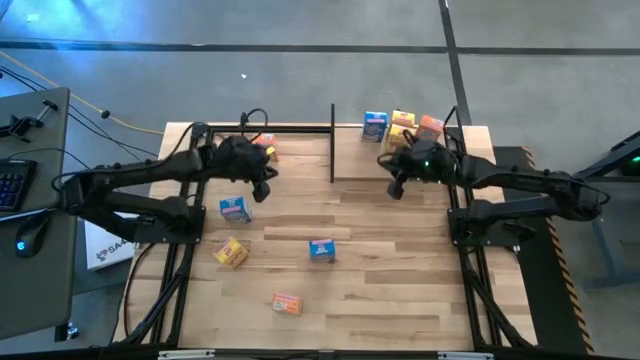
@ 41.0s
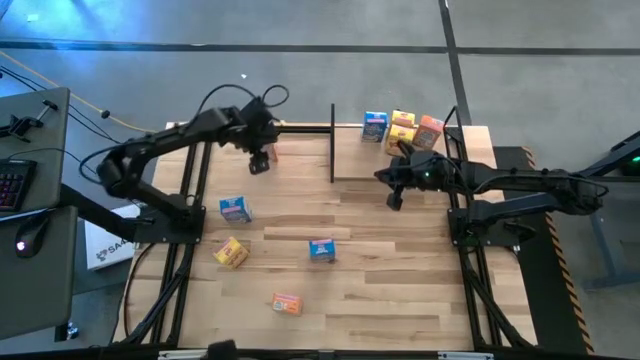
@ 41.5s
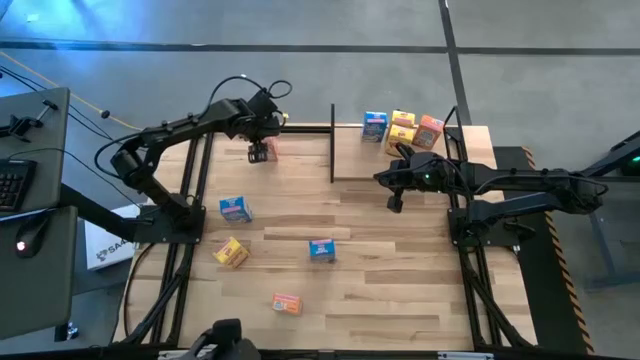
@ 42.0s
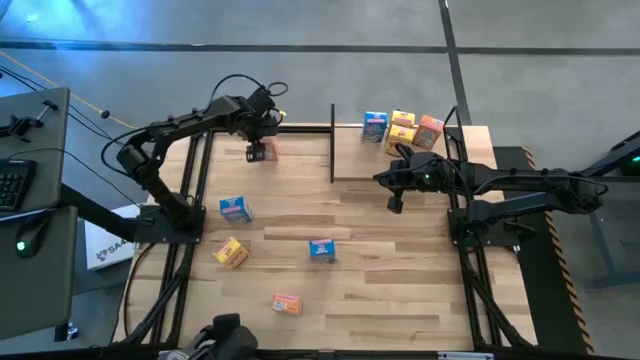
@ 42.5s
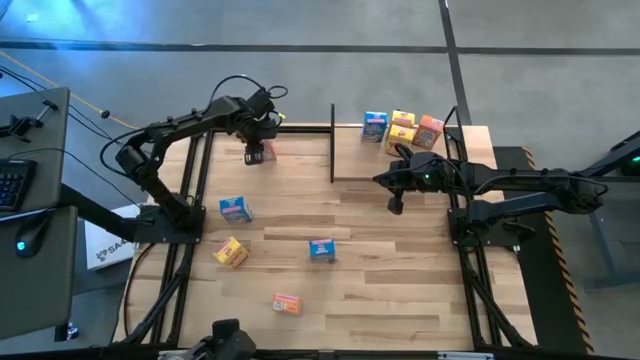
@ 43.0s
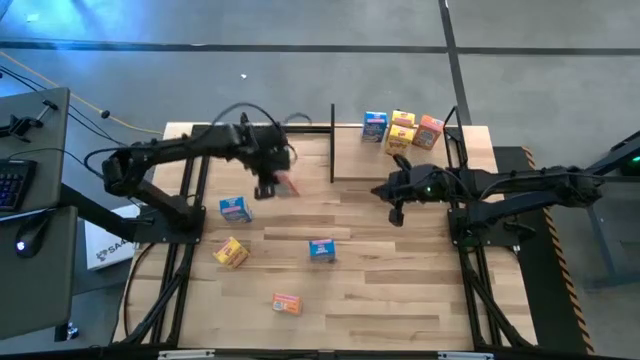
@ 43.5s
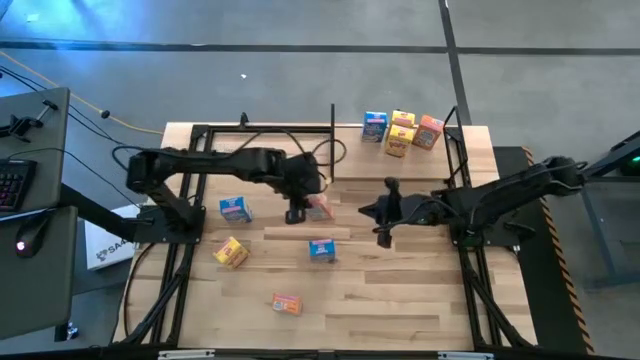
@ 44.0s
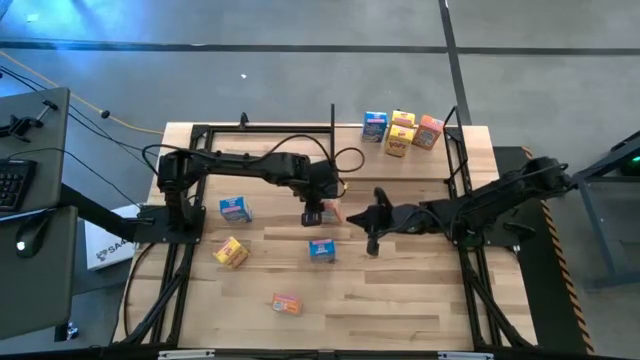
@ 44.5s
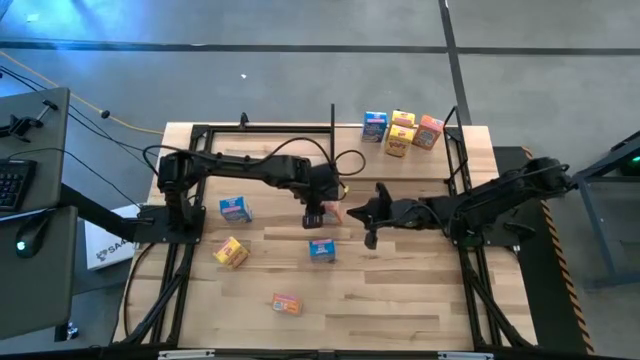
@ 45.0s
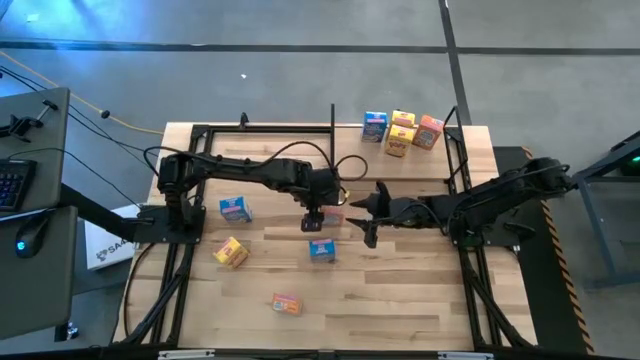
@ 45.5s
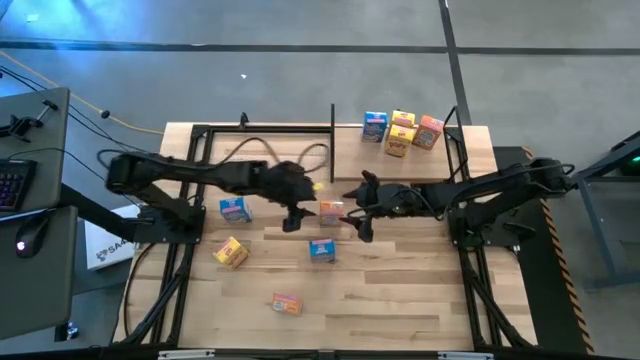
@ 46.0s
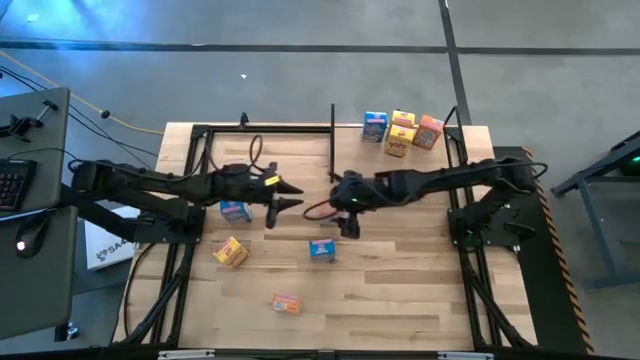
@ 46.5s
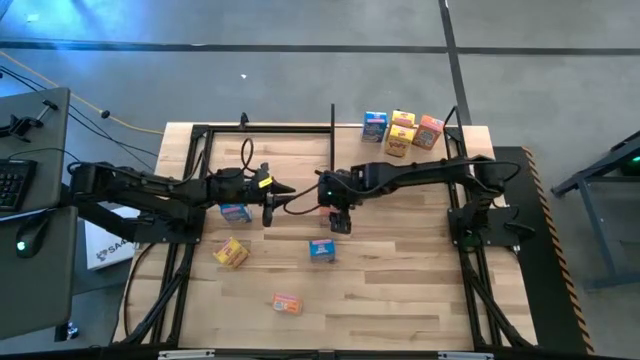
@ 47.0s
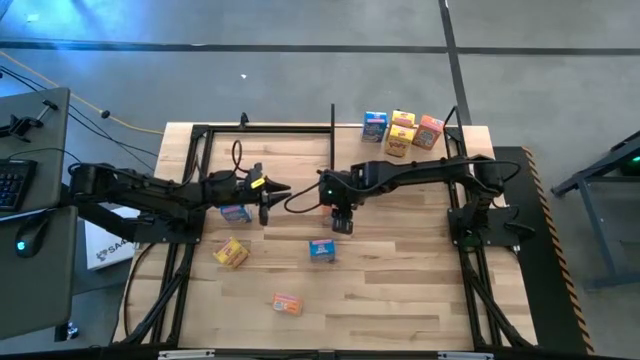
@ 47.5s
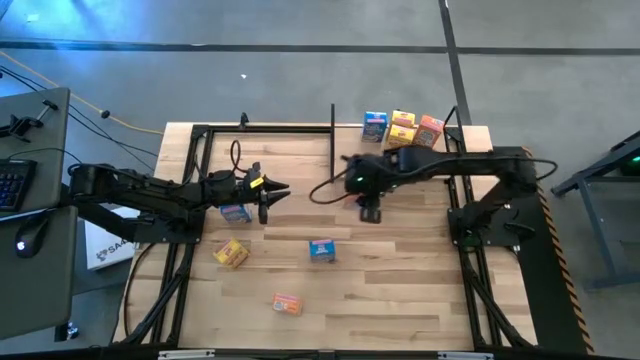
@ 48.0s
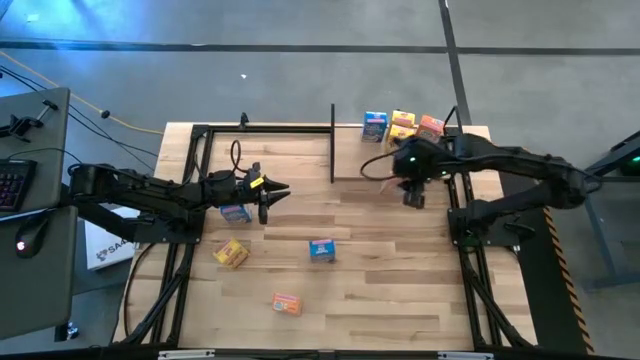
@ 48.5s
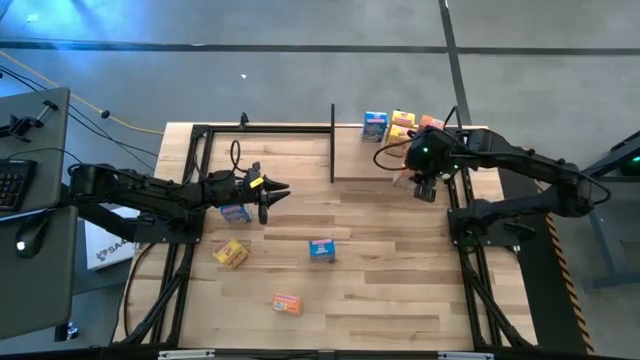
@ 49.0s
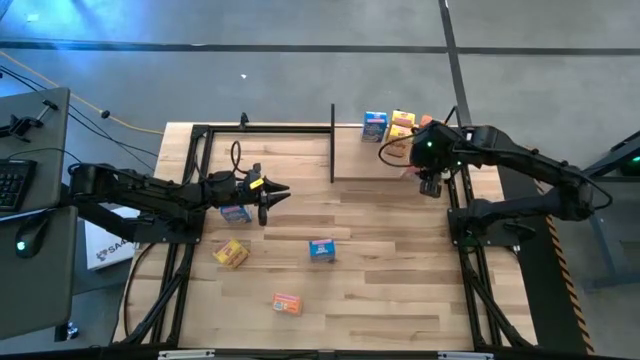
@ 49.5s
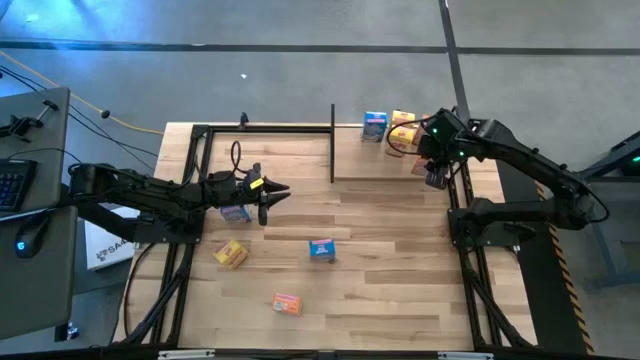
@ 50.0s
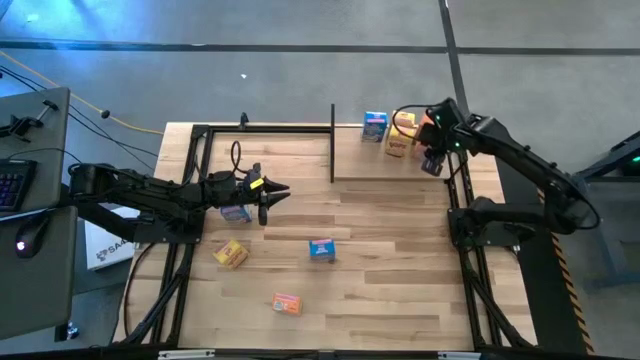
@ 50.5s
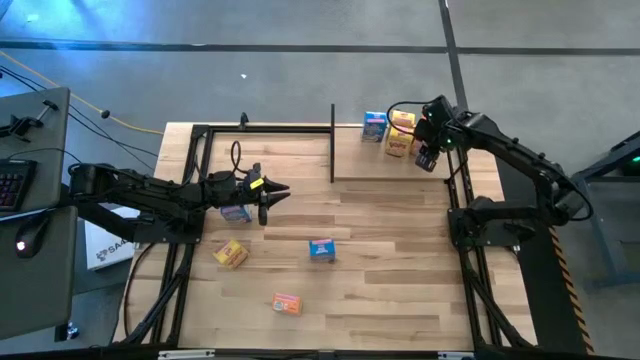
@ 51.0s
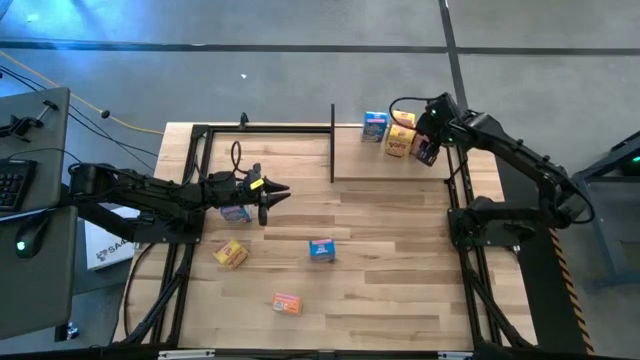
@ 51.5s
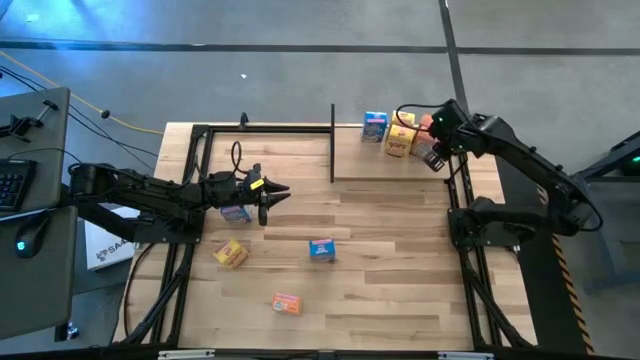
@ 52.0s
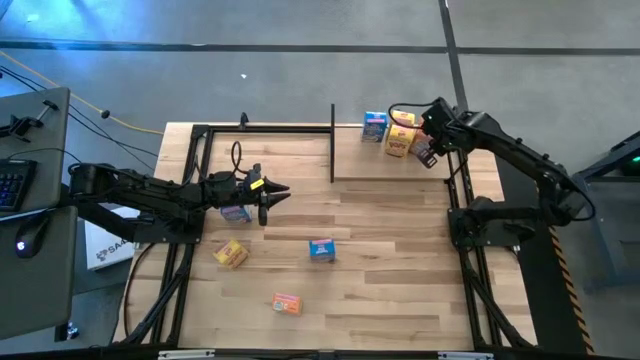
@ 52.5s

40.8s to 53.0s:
Task: Stack cereal on shelf
Put the top orange cereal box on the shelf aligned with the other yellow cereal box

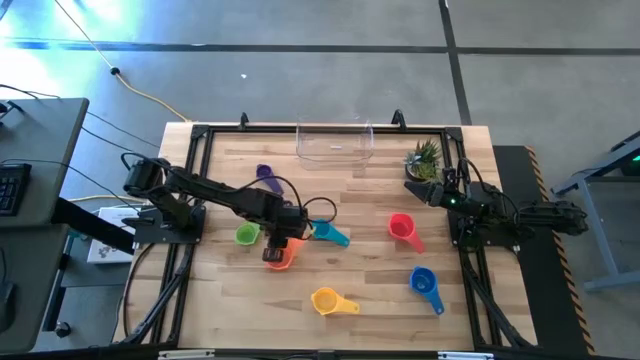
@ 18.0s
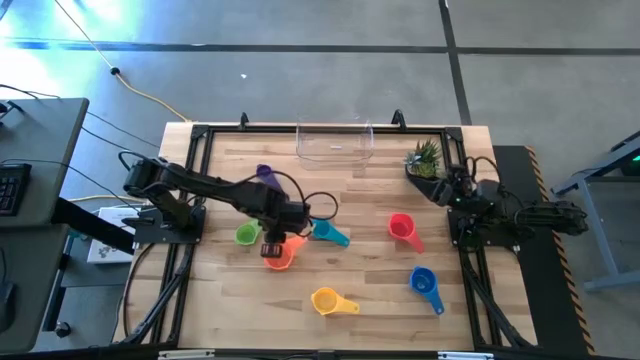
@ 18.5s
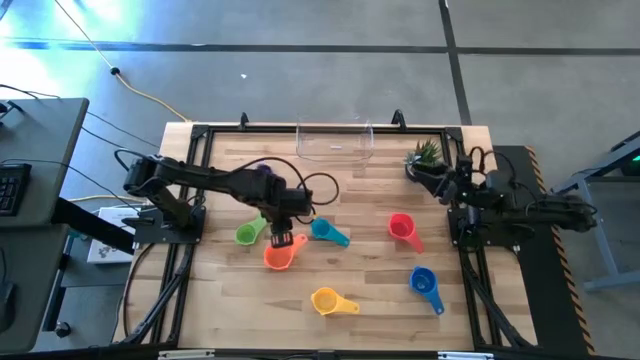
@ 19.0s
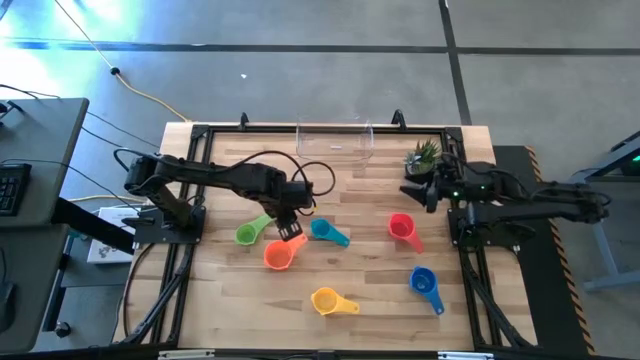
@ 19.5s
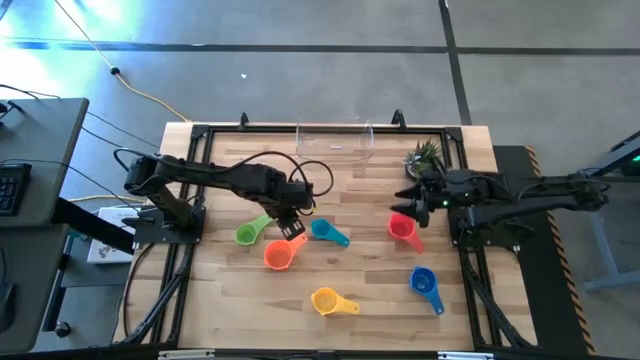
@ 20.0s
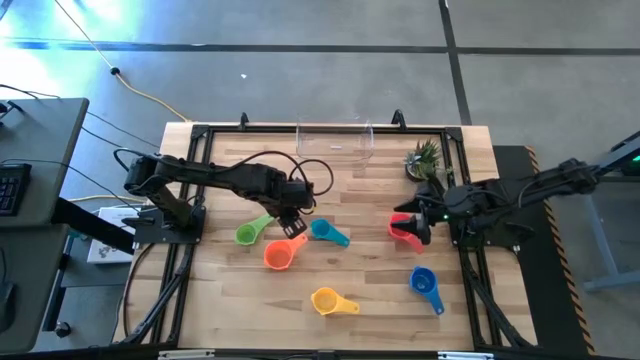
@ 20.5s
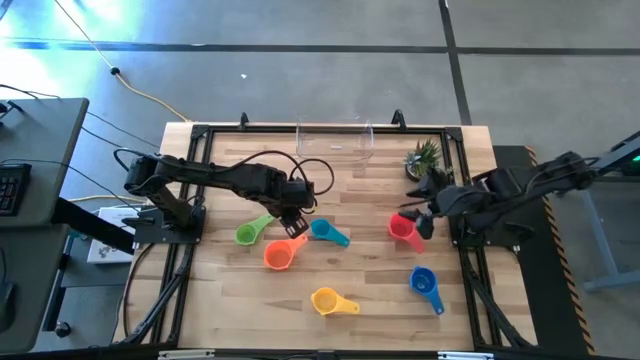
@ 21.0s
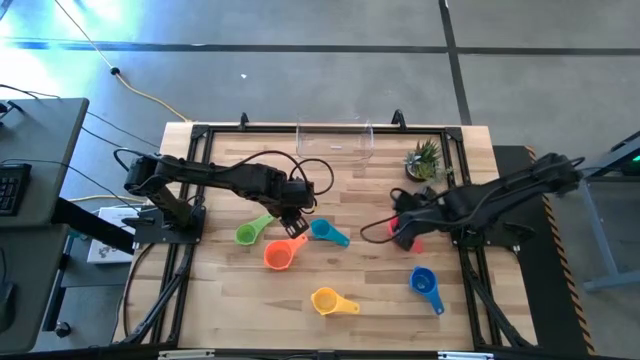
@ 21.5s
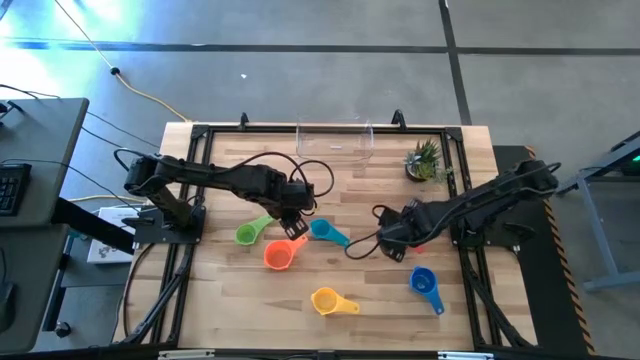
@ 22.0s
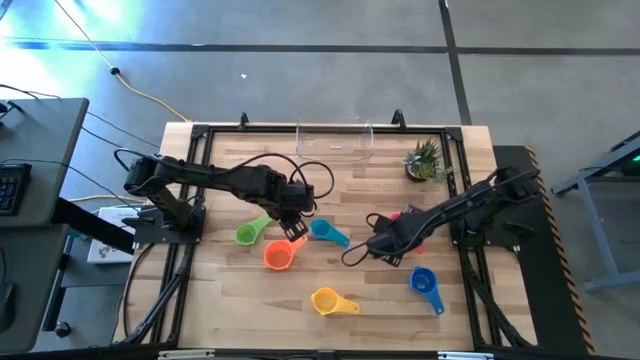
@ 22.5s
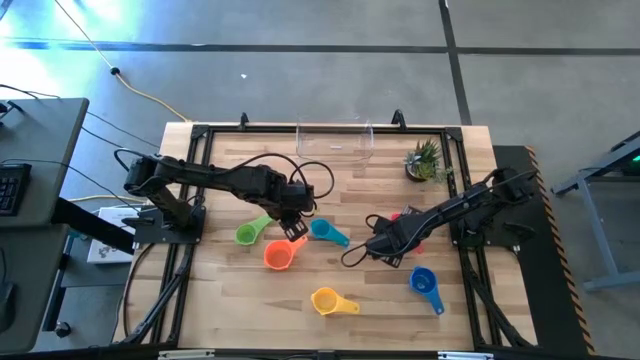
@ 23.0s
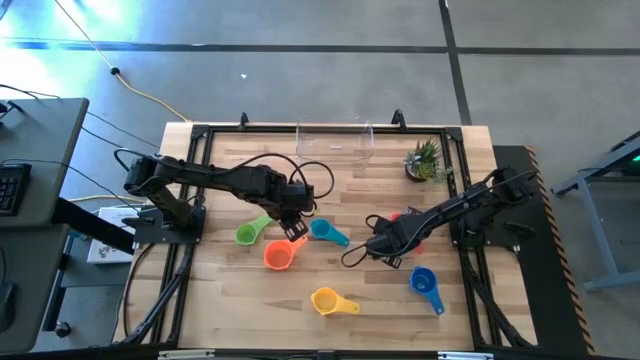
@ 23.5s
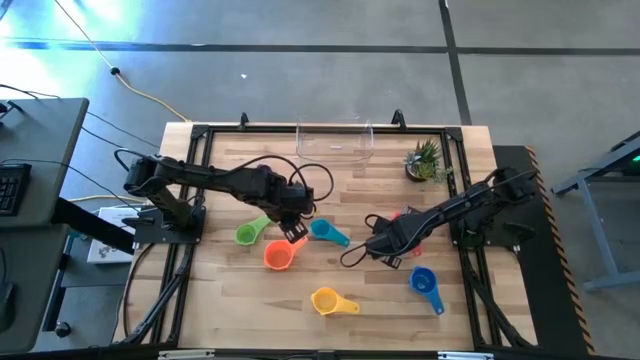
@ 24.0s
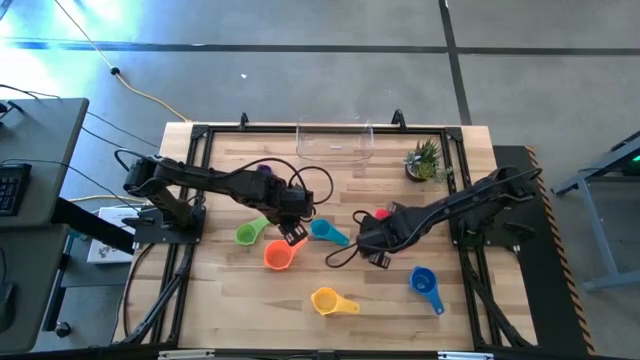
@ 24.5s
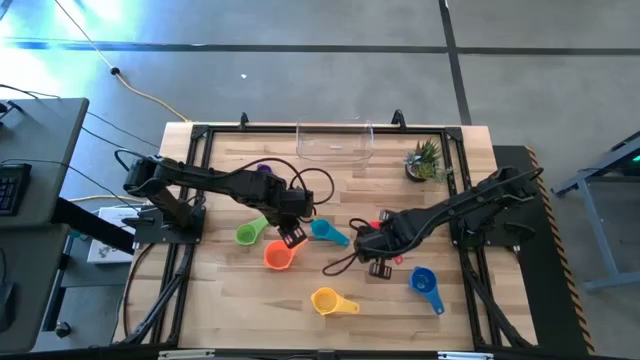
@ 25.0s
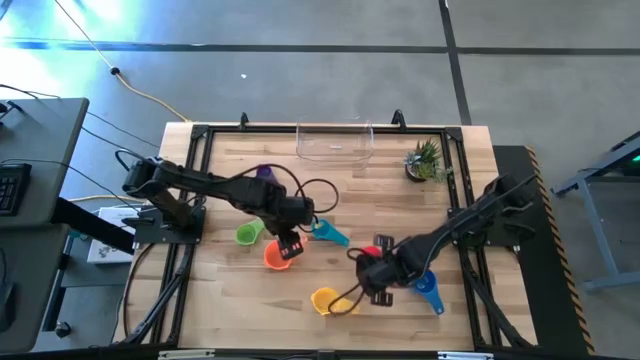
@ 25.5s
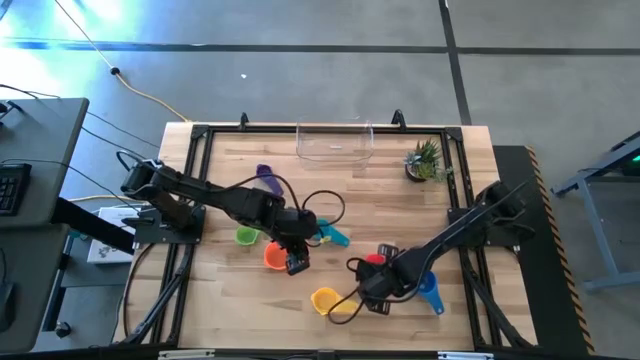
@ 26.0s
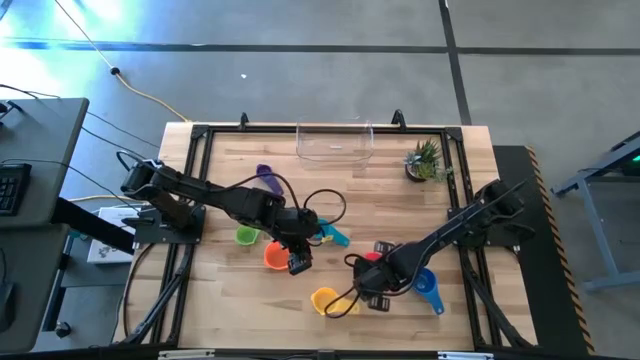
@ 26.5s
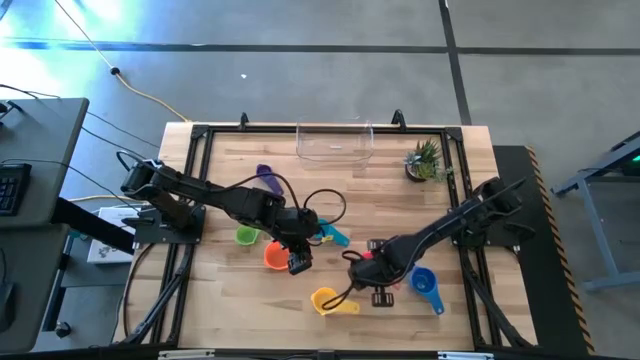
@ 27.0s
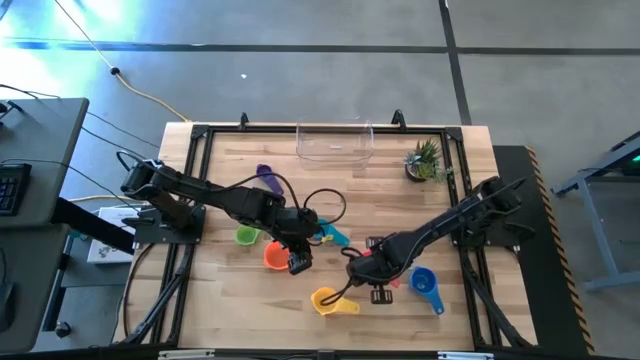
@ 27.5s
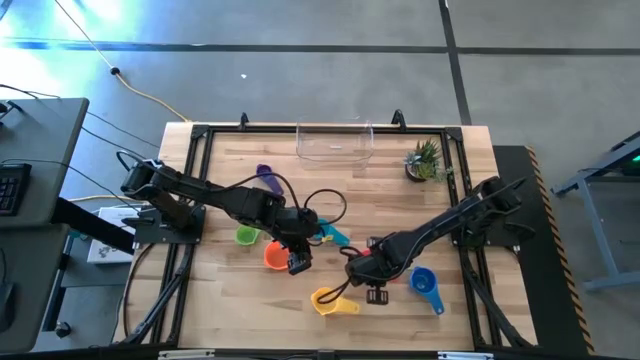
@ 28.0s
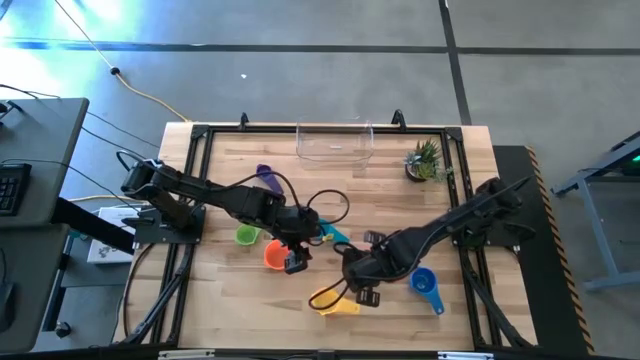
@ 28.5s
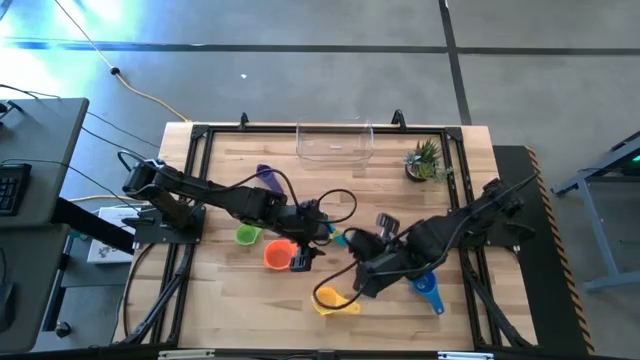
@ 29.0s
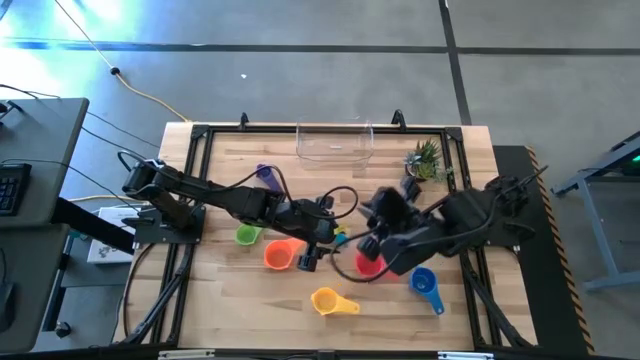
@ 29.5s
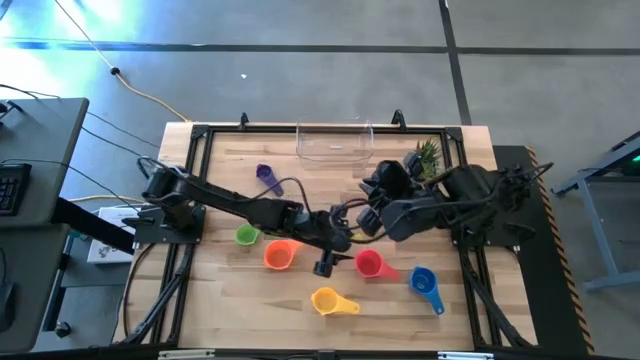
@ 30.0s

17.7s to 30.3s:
Task: Nest measuring cups in basket
Stack the red measuring cup on top of the orange measuring cup
